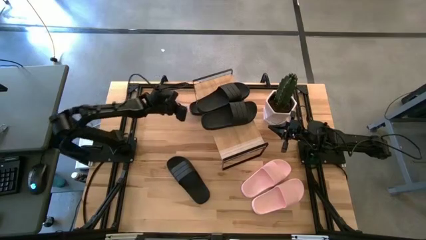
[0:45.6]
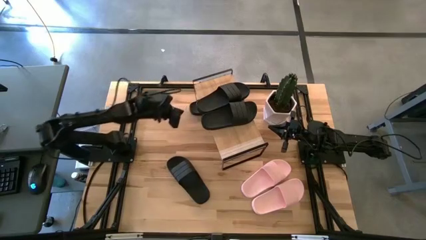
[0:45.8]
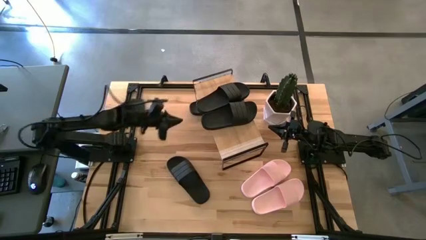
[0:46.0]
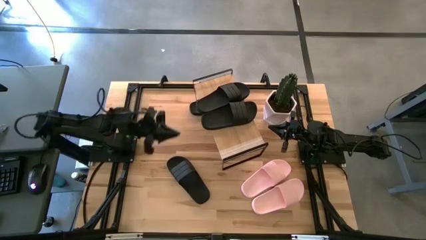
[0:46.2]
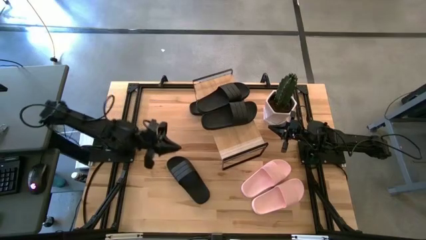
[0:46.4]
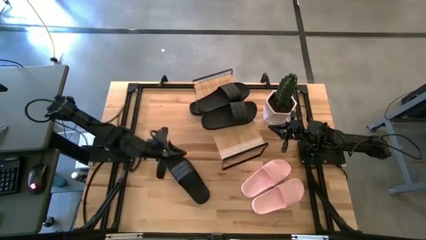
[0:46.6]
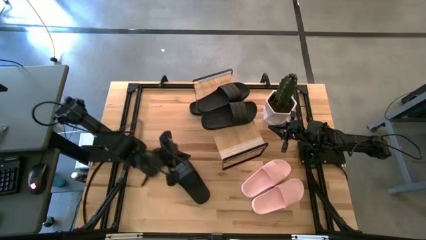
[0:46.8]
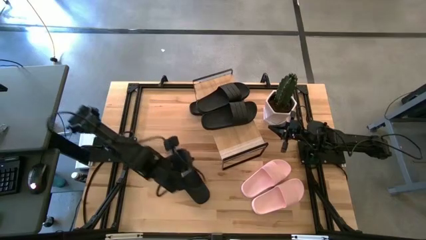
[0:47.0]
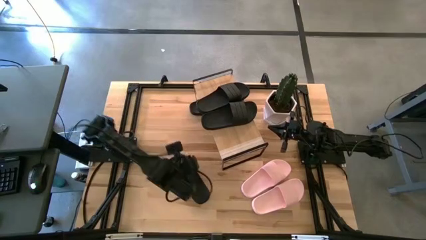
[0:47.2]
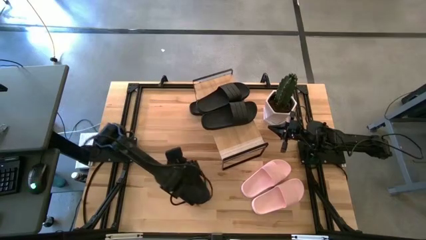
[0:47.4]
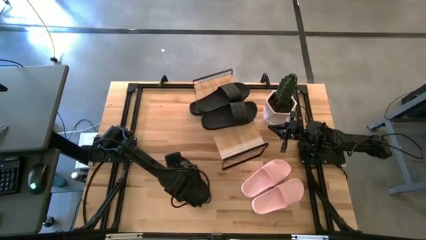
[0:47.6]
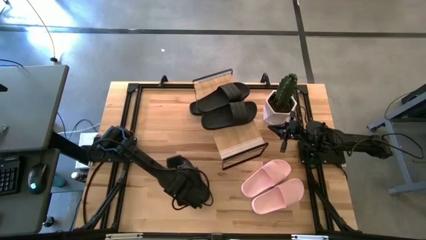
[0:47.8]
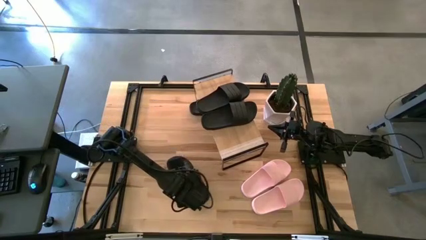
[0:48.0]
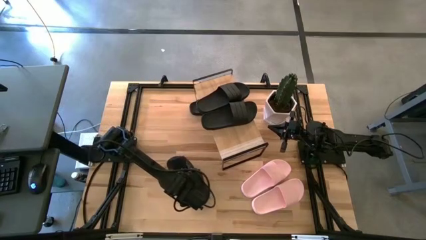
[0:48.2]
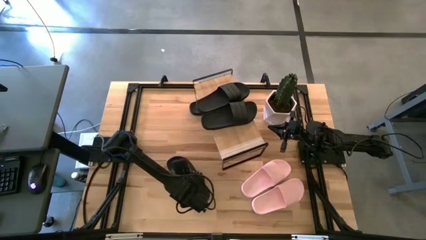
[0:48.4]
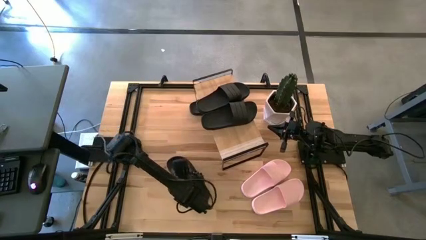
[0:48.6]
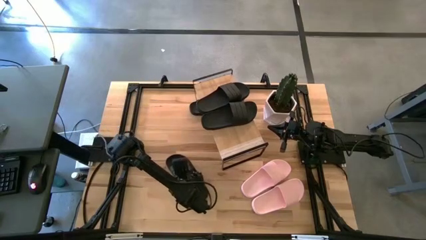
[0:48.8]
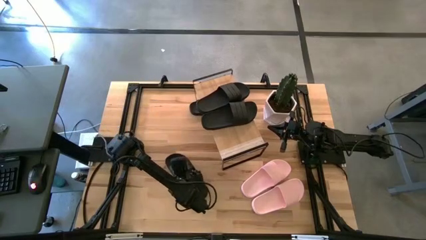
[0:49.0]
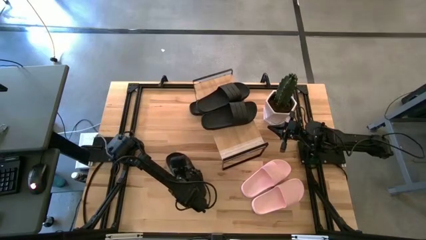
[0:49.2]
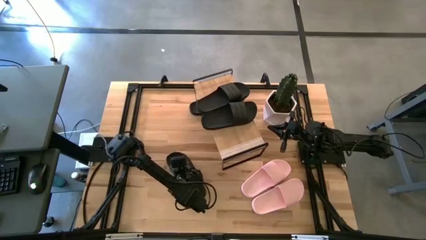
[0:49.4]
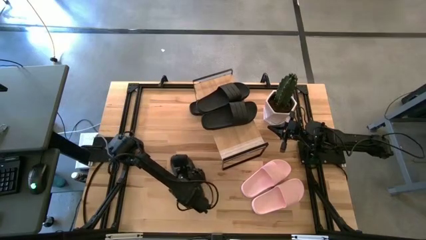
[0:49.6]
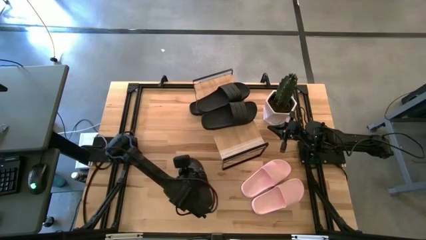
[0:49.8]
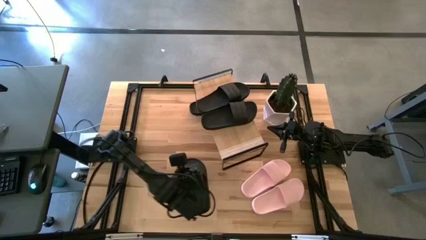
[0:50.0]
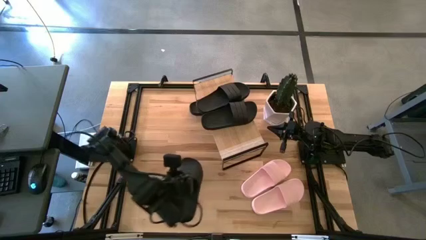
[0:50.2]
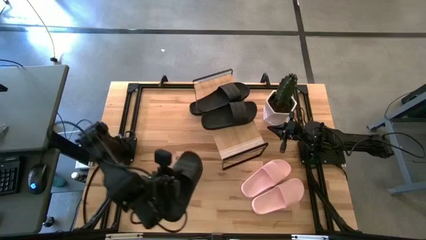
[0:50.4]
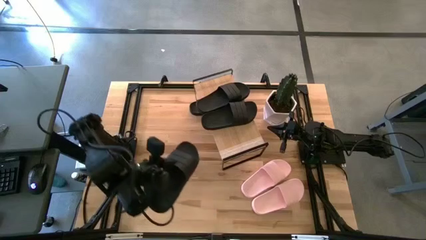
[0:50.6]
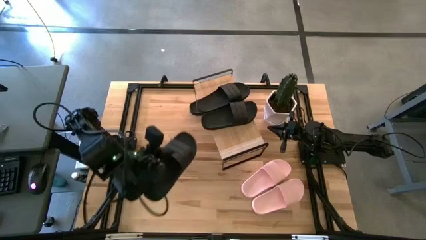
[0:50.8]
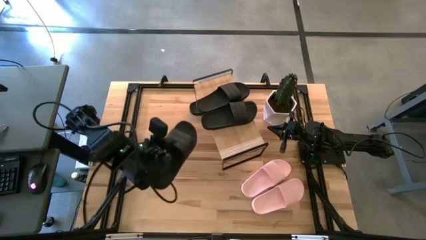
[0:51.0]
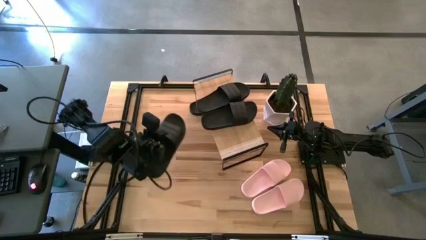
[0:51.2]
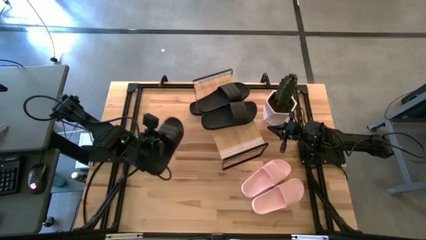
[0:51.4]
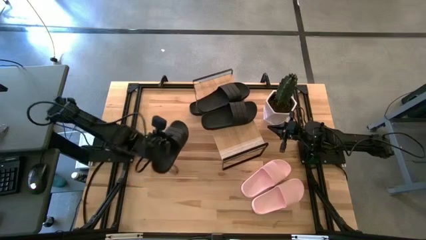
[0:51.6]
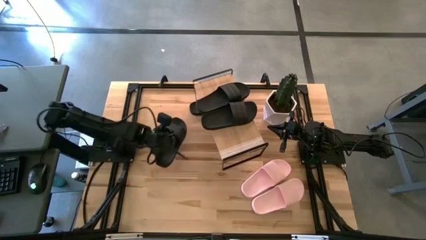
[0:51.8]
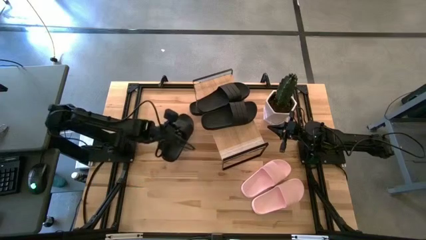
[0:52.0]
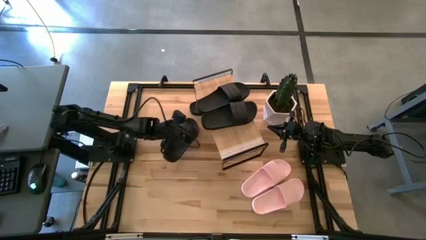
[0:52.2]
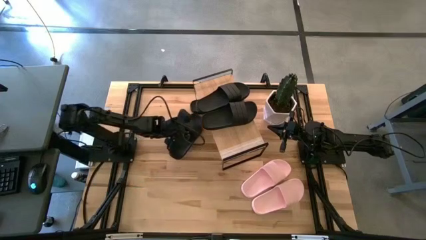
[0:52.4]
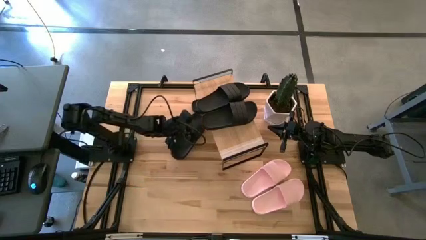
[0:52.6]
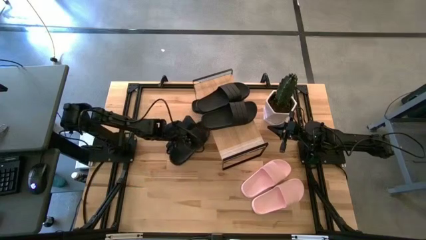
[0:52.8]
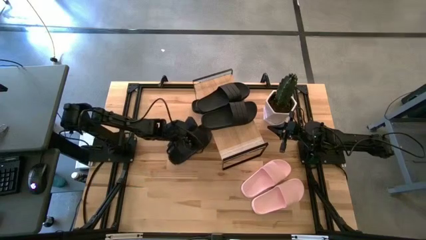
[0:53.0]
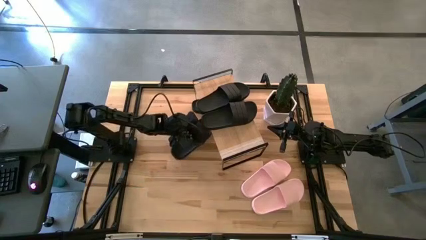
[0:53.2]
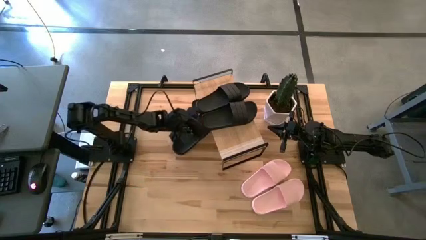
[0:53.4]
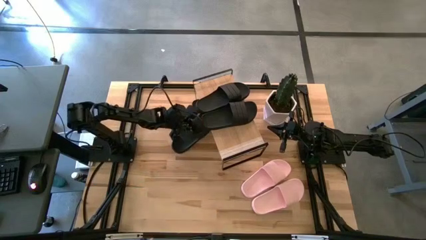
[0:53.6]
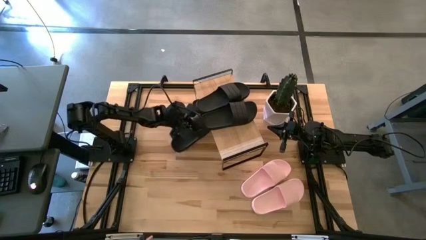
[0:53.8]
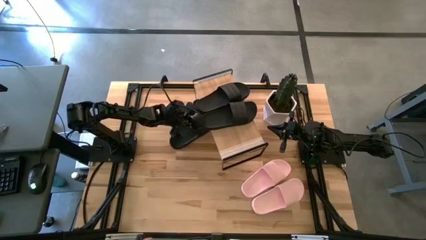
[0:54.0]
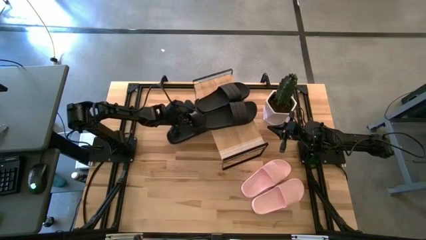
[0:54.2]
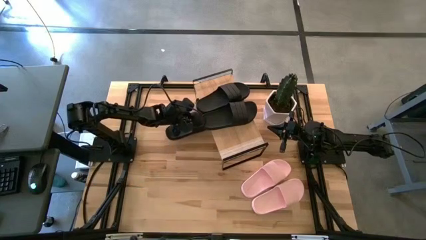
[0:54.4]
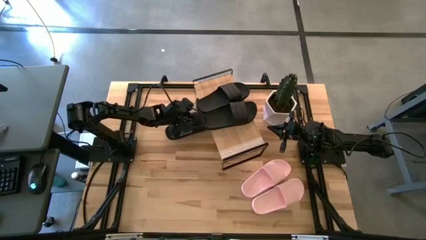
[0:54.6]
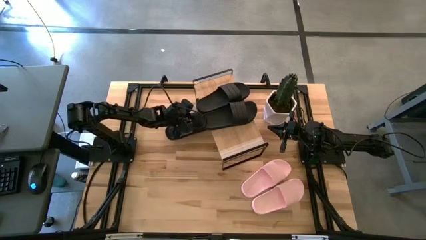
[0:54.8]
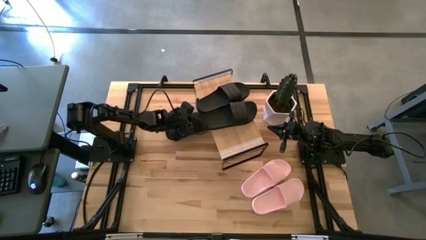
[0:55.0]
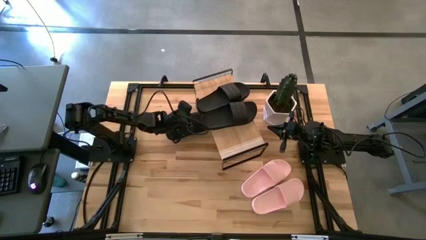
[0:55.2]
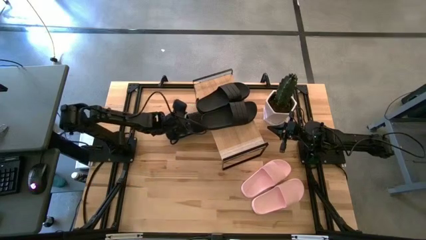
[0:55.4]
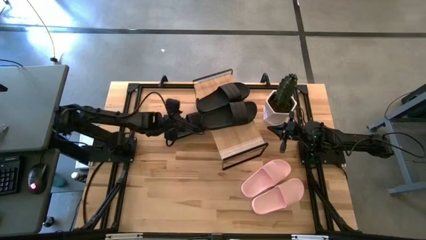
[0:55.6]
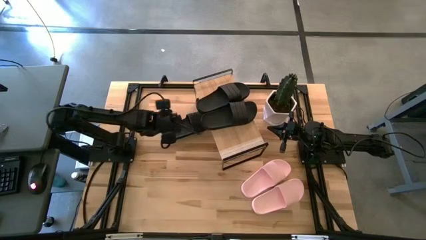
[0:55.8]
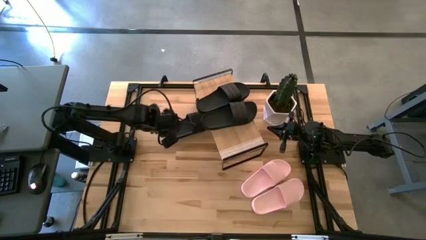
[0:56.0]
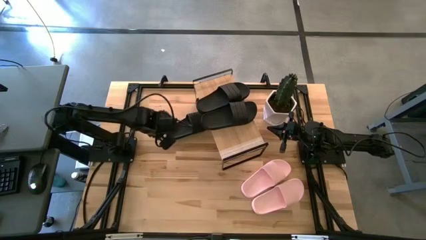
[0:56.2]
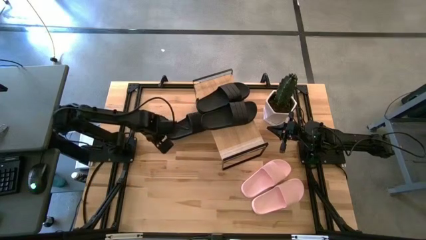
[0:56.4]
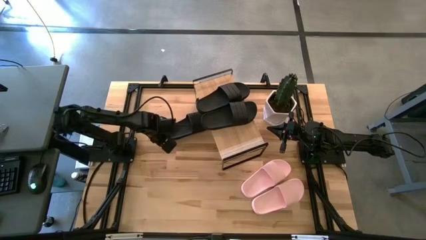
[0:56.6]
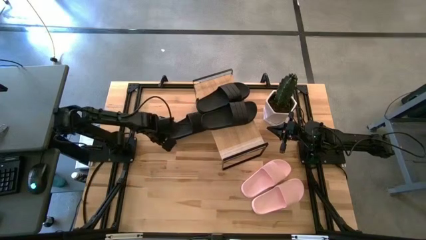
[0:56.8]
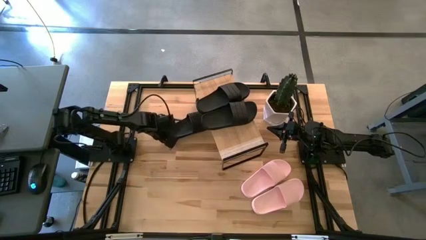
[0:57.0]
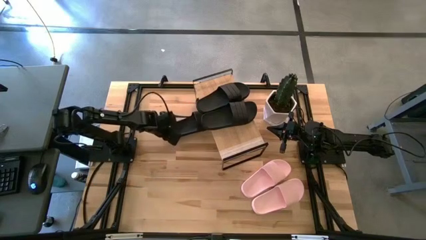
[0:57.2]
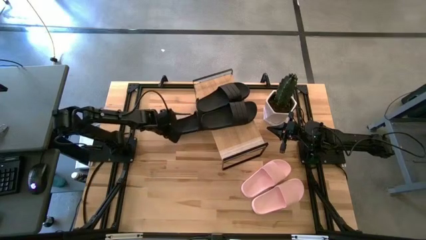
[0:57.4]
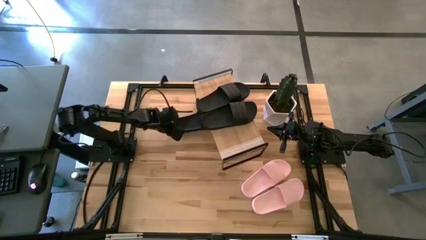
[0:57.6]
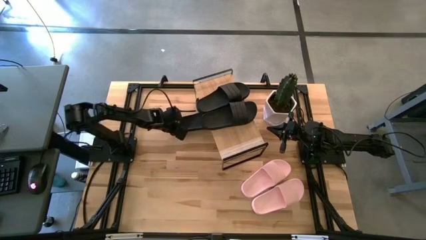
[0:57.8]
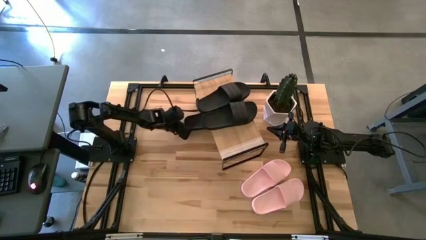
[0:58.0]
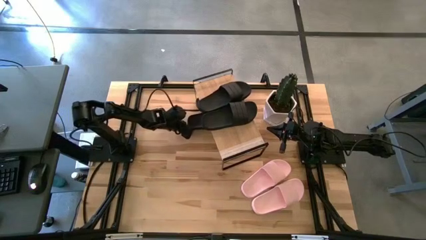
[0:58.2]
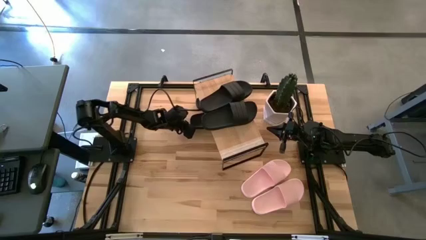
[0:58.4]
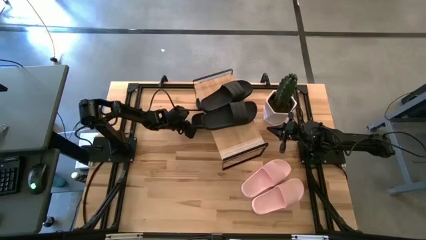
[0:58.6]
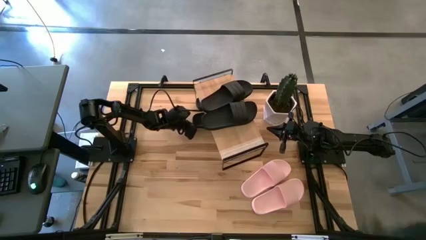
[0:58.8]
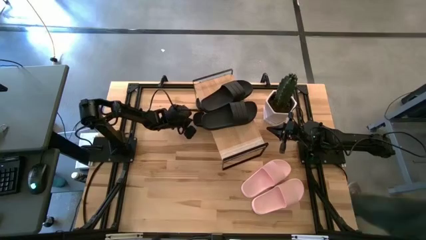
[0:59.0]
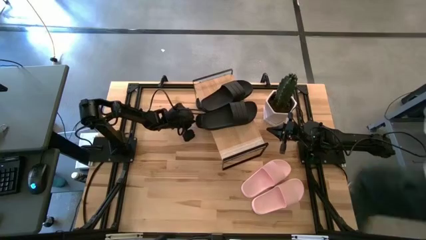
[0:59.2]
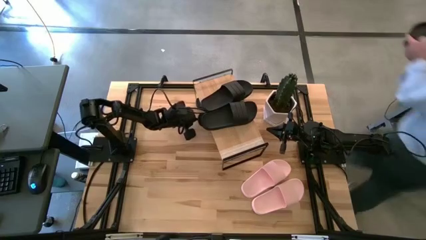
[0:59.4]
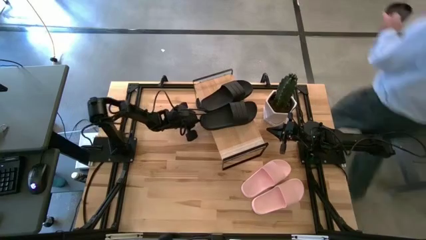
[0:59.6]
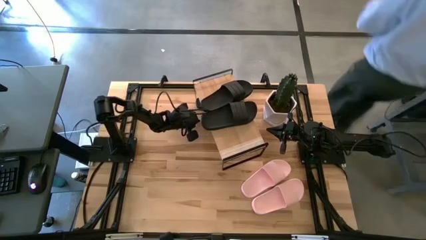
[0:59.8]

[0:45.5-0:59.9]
Task: Pick and place slides into the shelf
Put the black slide under the shelf

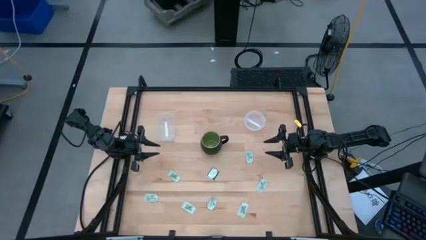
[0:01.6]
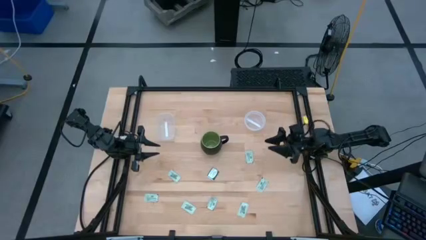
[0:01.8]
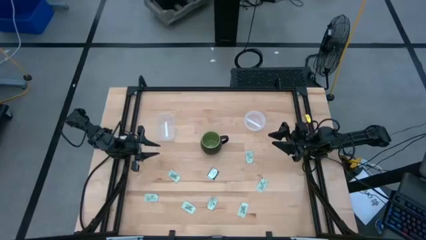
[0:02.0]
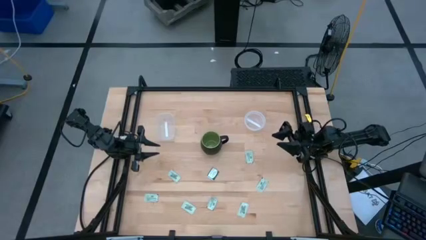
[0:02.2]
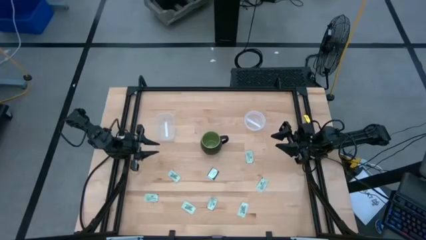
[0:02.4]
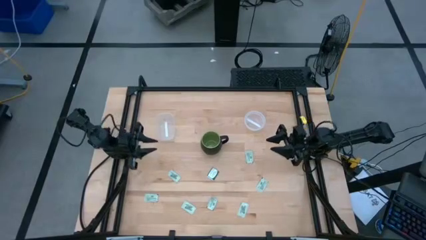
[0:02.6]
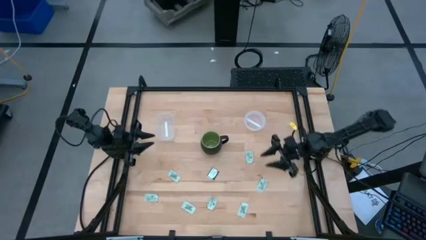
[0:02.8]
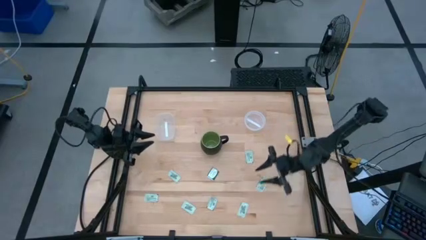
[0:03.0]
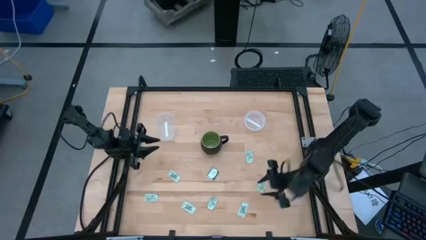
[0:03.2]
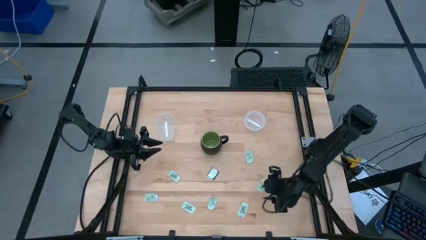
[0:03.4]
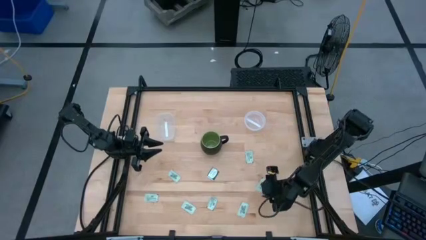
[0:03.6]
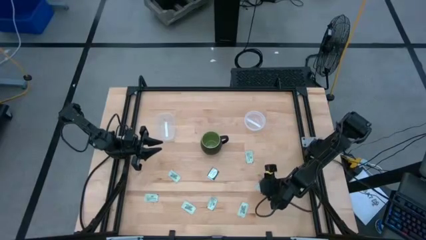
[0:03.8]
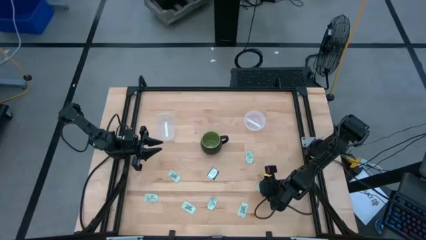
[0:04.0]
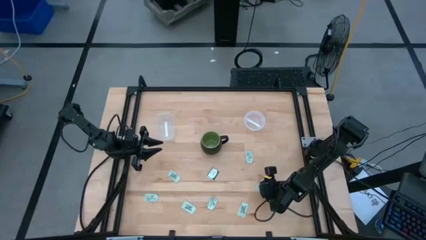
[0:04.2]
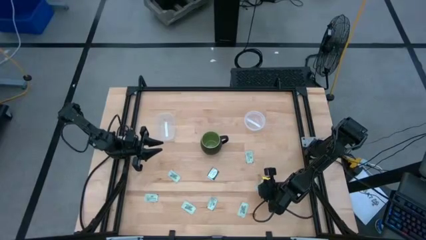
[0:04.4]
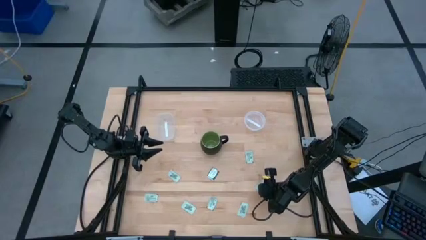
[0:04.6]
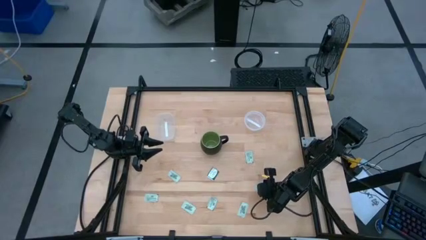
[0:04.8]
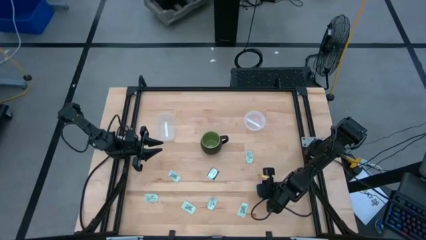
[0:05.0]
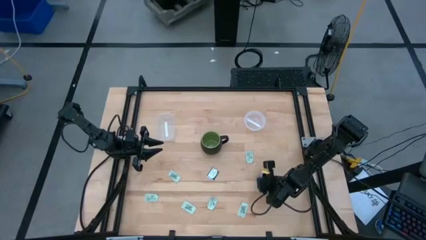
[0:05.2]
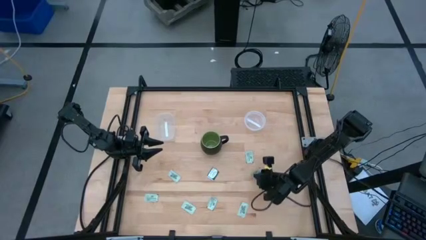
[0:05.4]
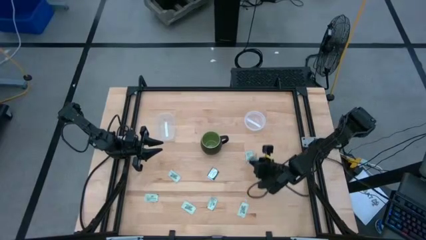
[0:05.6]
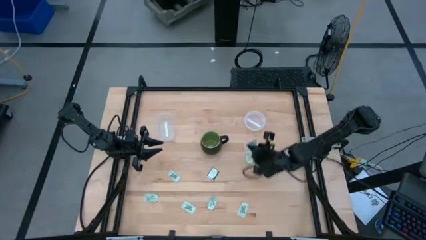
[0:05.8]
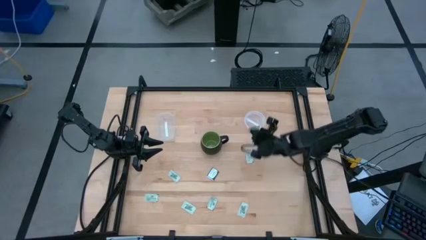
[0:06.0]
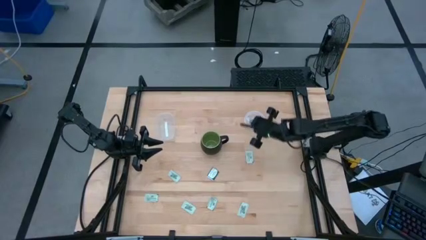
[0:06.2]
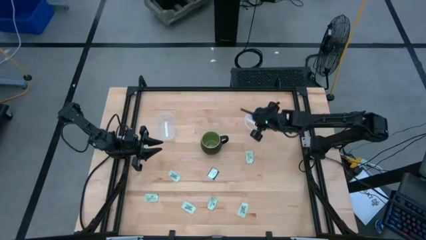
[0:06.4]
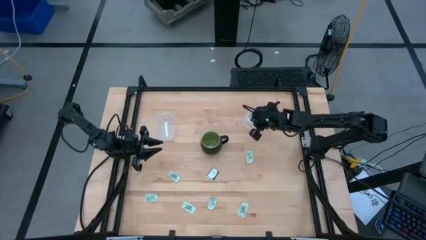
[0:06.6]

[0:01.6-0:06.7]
Task: Pick and place items into bin
Put the green stevia packet into the right transparent bin
